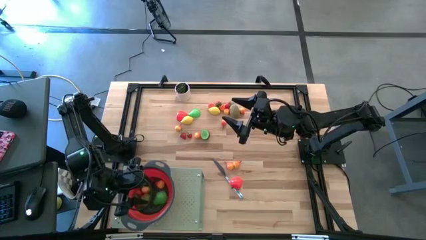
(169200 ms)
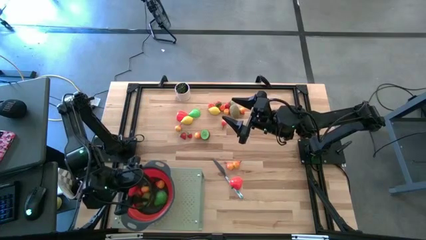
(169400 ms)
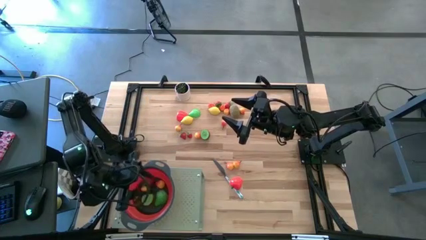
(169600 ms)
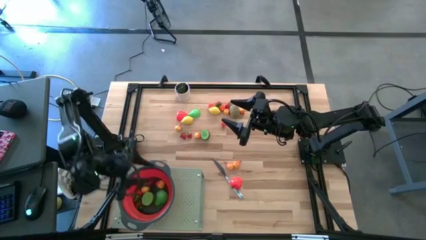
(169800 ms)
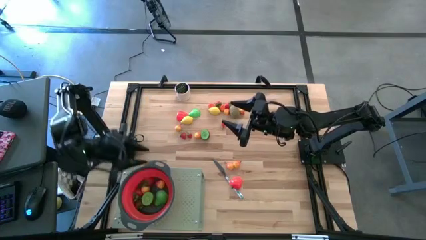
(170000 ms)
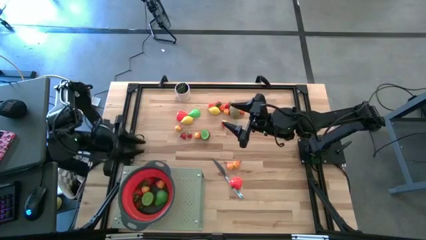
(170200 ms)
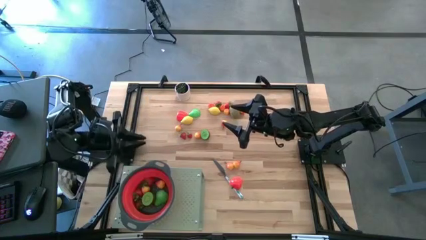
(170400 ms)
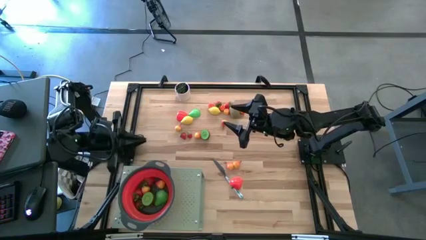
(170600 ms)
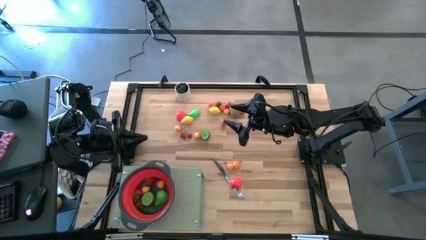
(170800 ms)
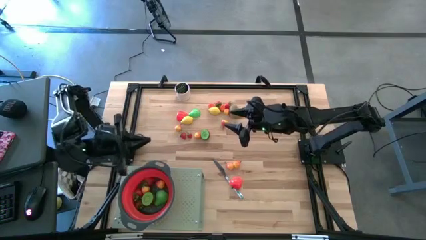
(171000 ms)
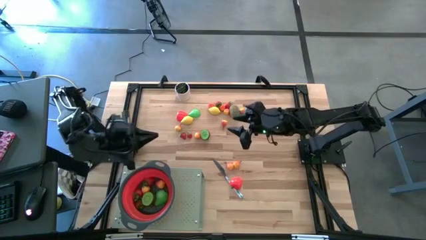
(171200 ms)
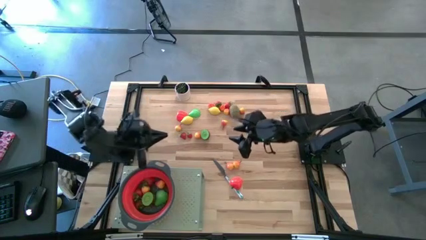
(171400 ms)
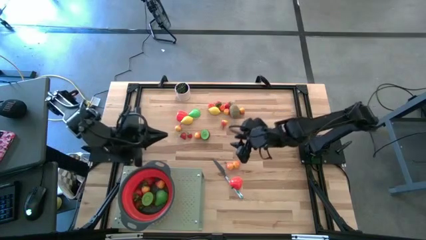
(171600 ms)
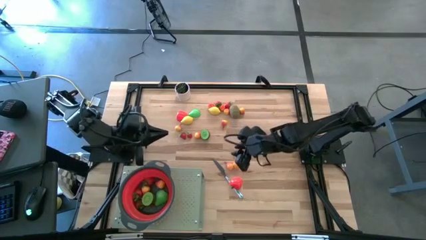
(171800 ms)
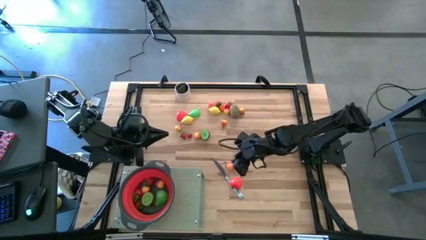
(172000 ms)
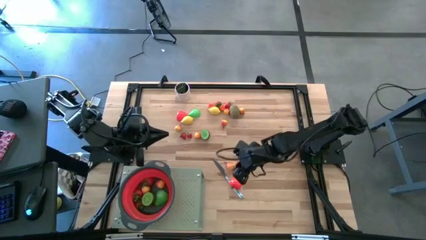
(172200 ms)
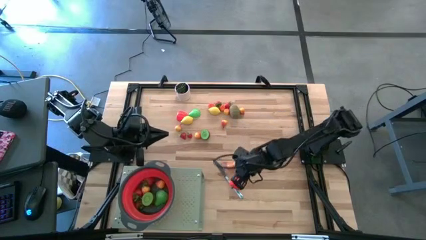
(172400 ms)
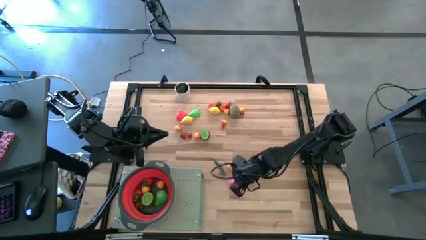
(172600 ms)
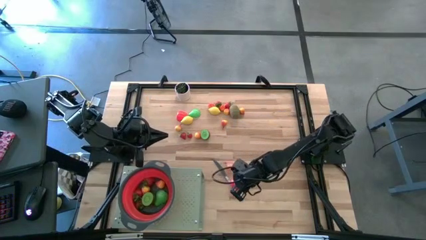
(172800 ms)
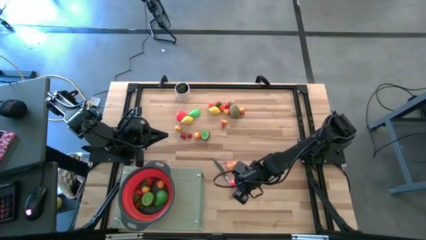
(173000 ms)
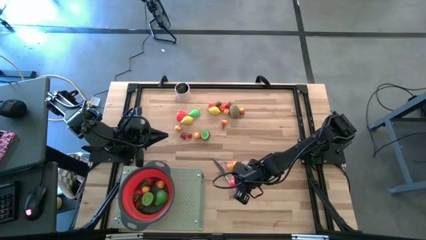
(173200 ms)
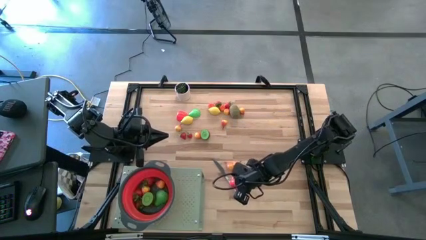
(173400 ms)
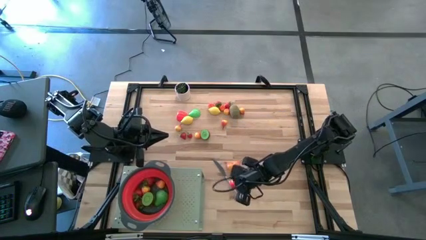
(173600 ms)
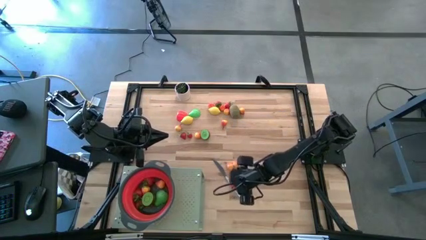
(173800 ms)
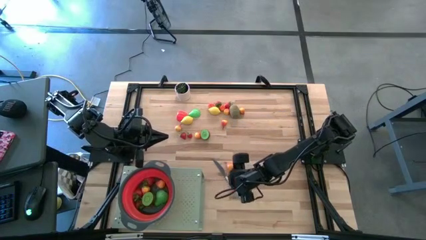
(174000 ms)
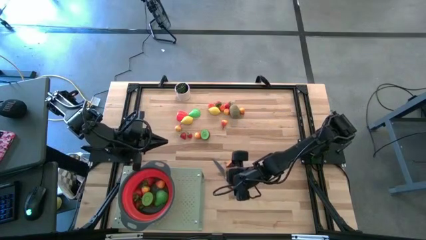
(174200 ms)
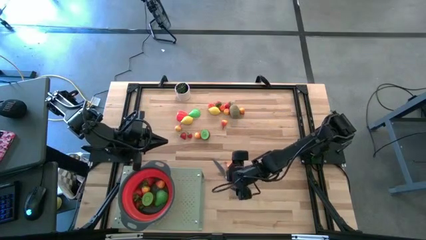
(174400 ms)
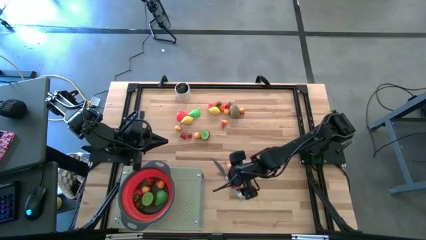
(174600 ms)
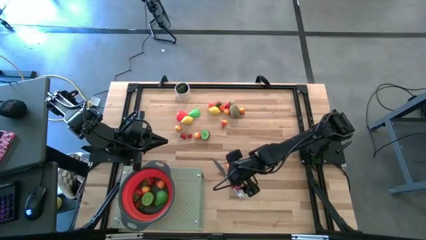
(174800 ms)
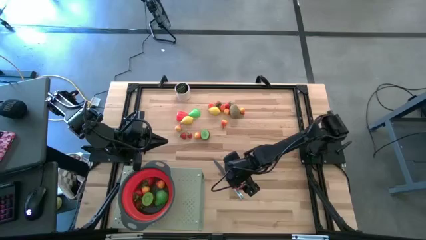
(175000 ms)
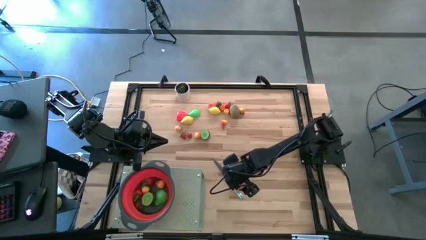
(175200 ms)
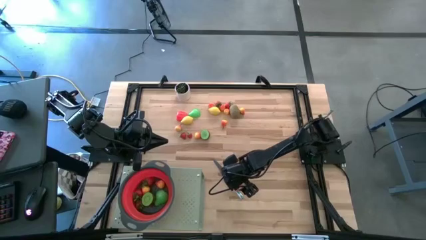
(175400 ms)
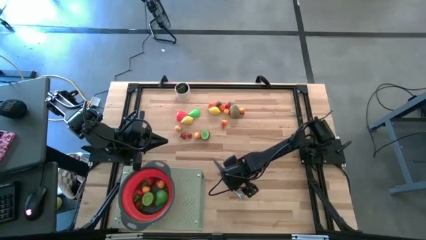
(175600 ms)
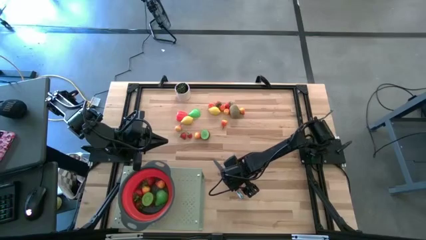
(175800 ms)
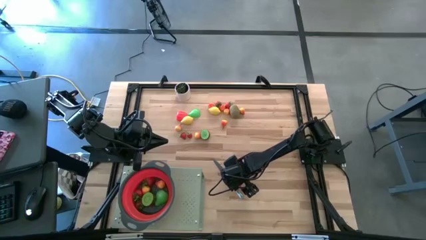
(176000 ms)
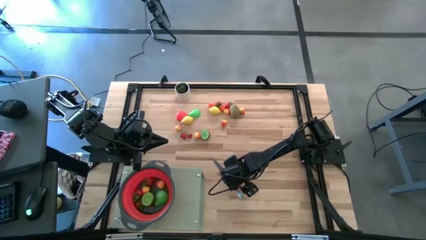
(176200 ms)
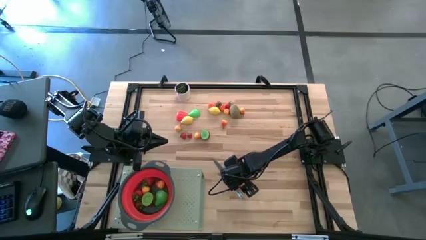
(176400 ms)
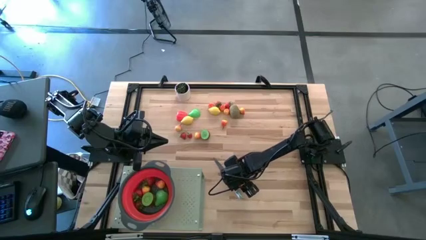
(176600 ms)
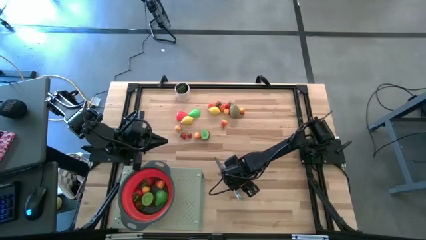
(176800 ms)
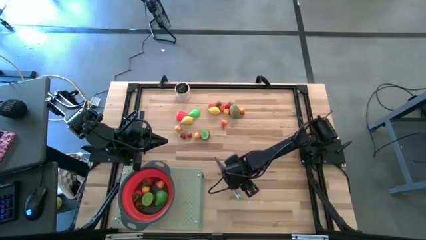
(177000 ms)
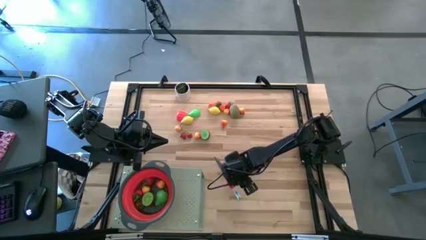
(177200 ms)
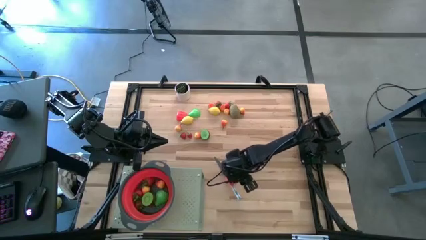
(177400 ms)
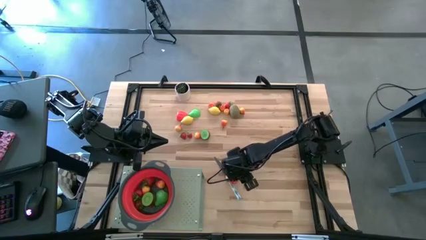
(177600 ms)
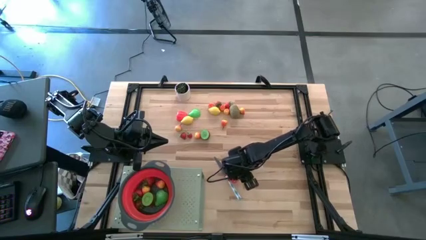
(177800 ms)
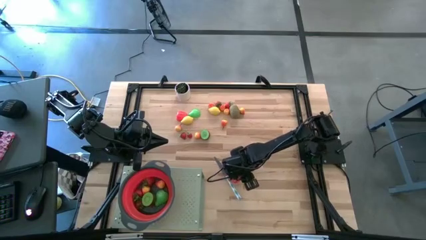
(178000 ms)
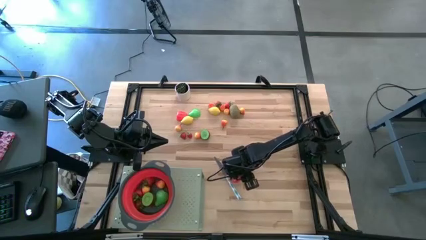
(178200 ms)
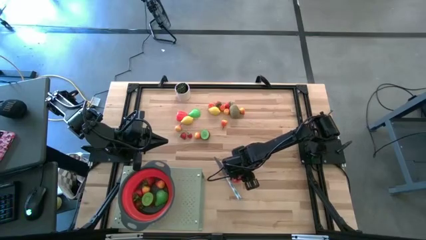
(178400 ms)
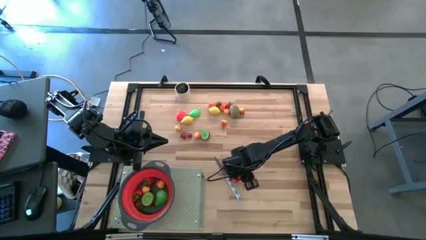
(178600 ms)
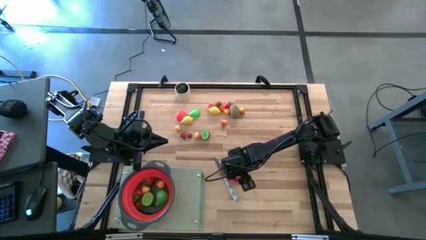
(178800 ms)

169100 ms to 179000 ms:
Task: Pick & Place Fruit
Put the half apple into the red strainer bowl on the shelf

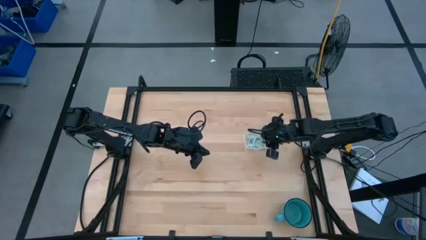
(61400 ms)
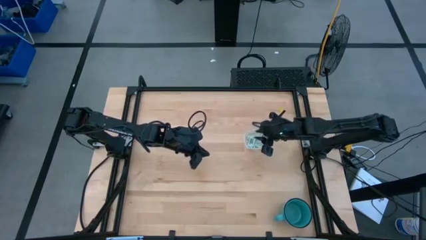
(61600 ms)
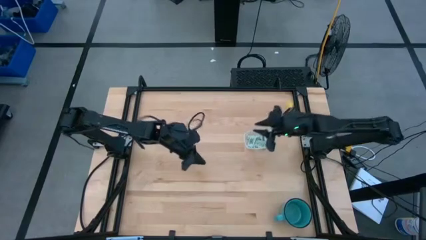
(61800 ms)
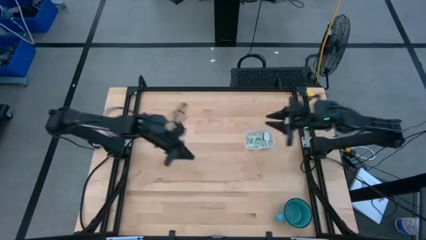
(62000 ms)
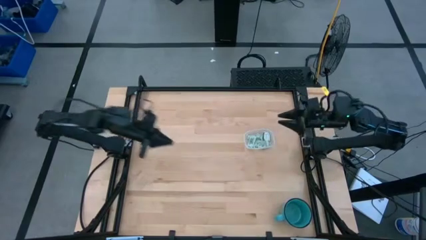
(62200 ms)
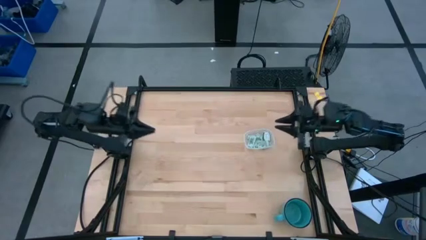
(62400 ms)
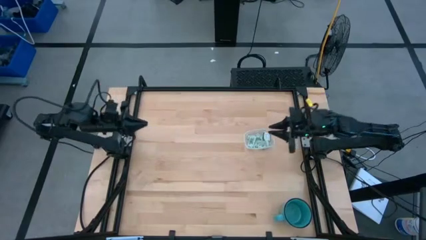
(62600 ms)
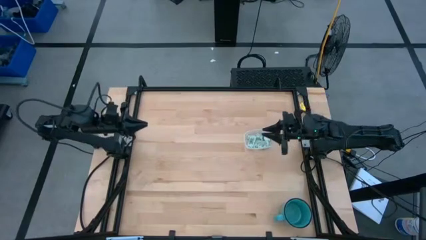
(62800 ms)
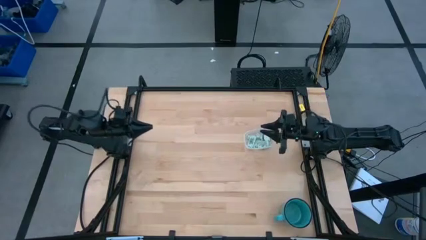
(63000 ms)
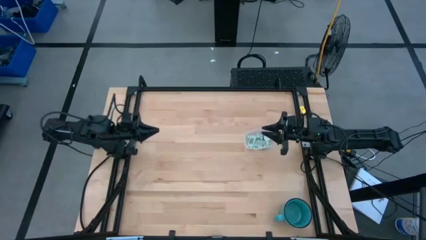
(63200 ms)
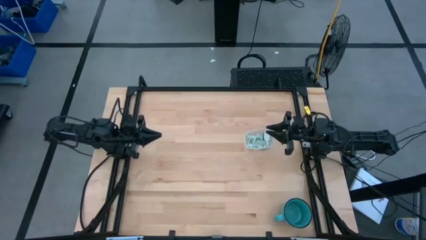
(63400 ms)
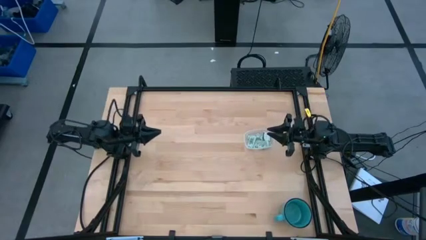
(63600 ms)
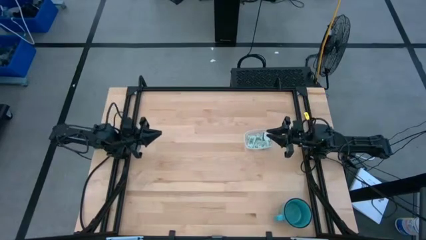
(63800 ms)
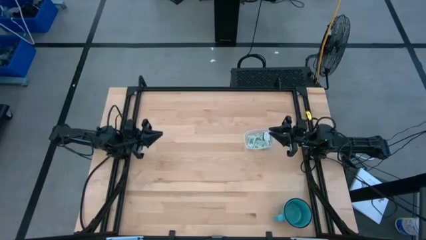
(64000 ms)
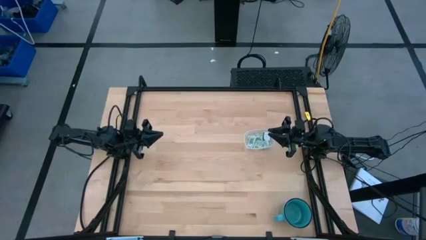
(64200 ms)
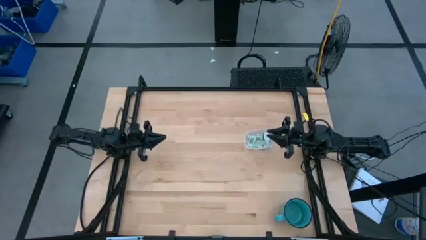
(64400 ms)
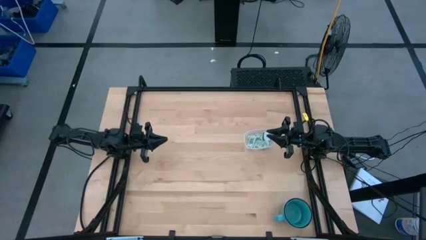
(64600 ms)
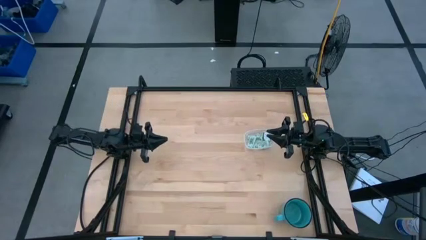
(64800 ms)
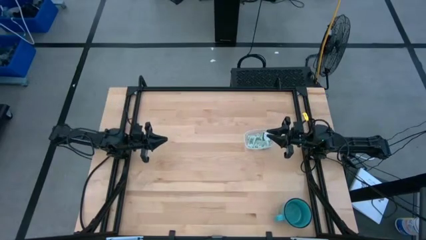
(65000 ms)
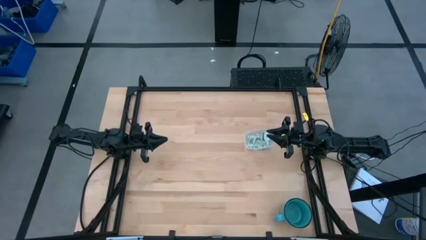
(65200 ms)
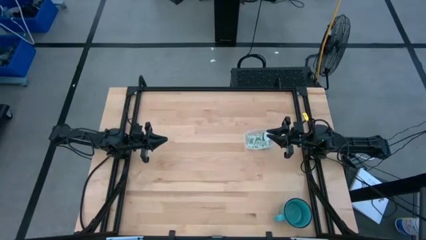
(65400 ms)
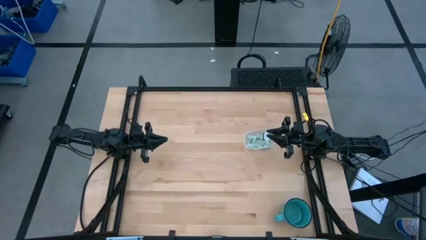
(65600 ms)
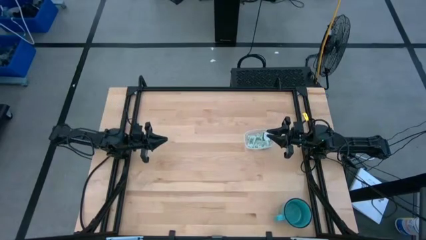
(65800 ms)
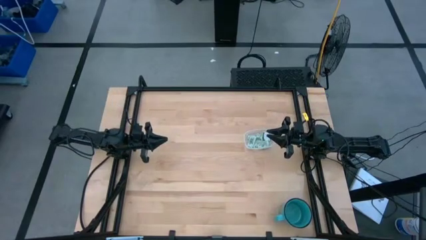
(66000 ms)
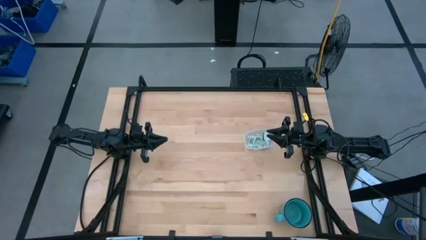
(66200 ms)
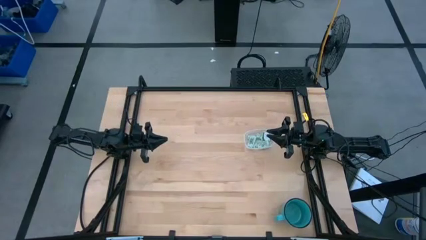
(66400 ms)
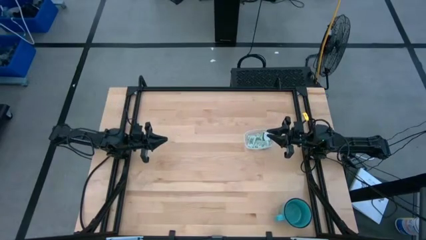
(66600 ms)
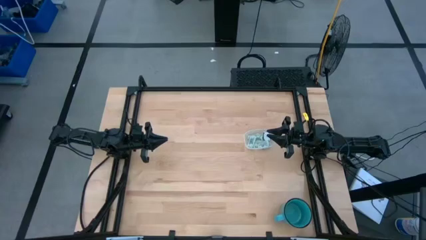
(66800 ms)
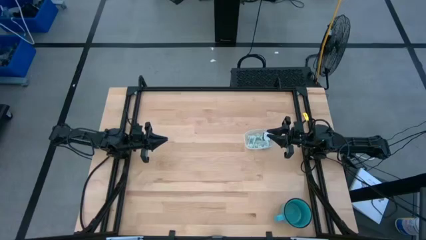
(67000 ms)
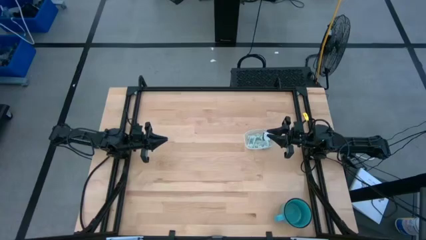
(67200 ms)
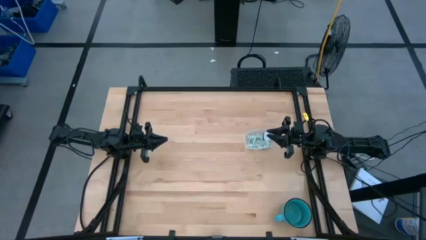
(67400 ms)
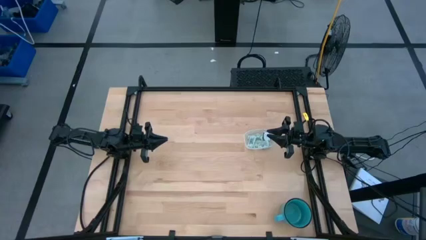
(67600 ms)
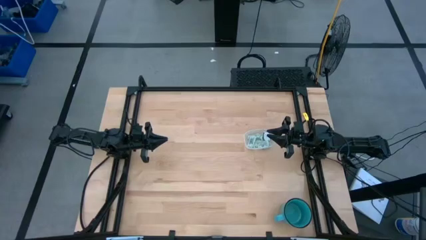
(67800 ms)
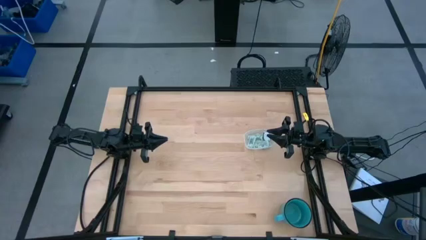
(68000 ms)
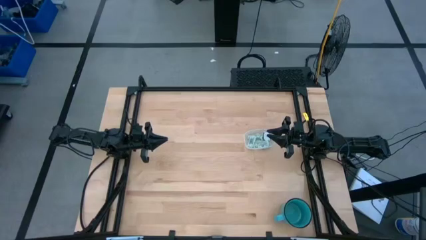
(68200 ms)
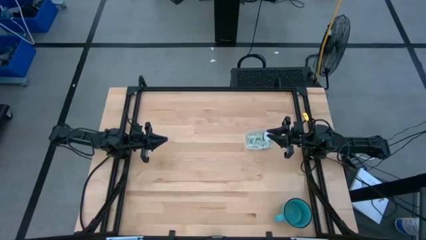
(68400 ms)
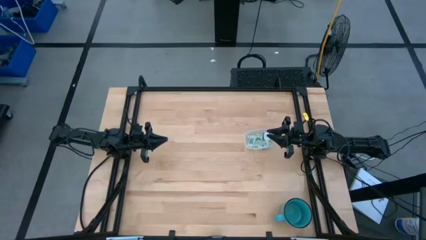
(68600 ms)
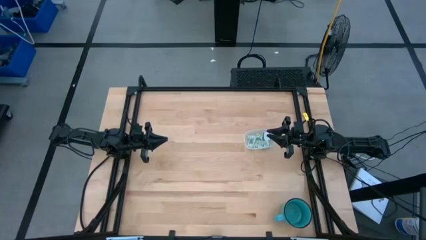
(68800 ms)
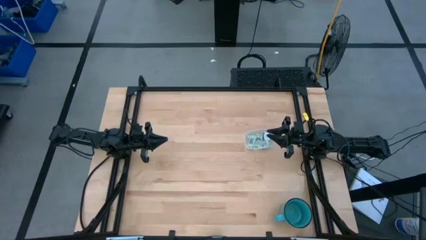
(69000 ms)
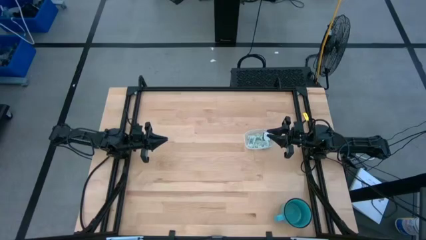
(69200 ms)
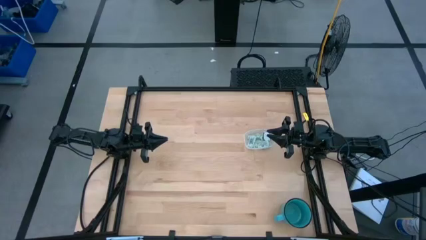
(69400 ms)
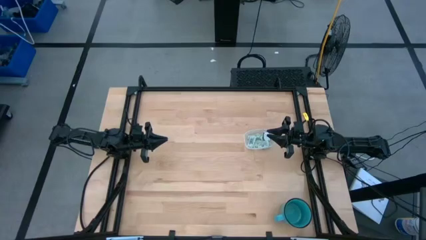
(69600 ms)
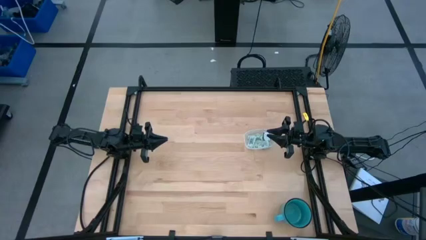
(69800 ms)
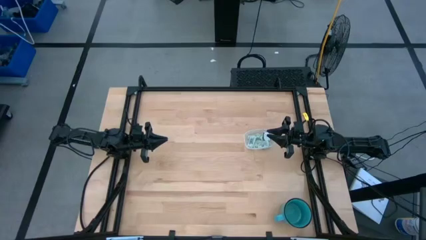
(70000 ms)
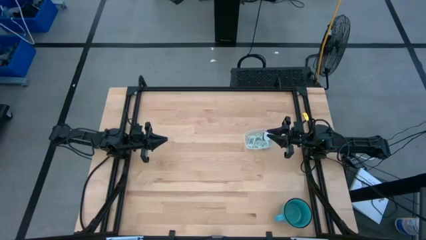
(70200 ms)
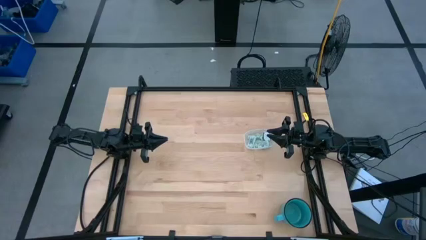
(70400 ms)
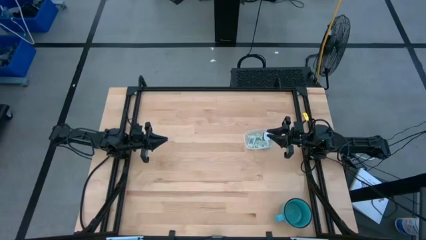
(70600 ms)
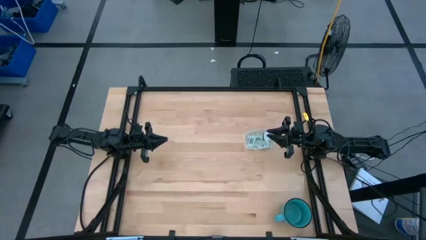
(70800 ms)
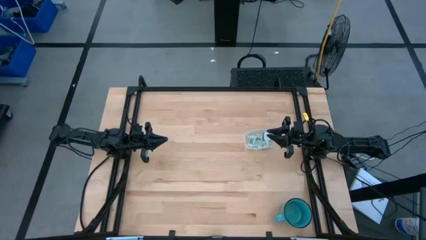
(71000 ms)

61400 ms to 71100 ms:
Task: Pick and place Stevia / Truvia into bins
Return to Home Position
